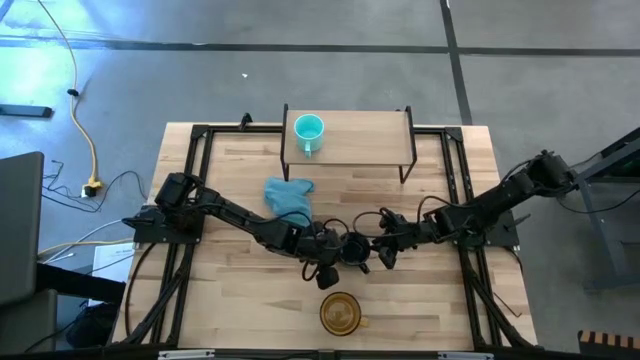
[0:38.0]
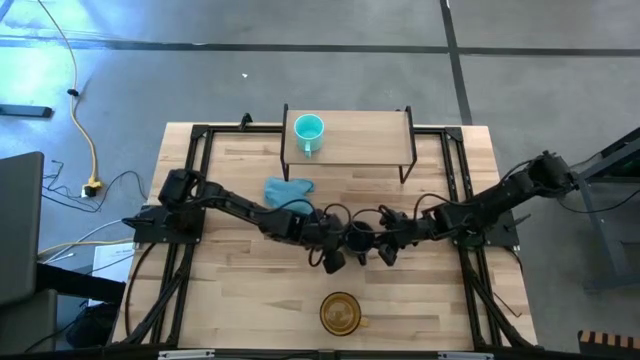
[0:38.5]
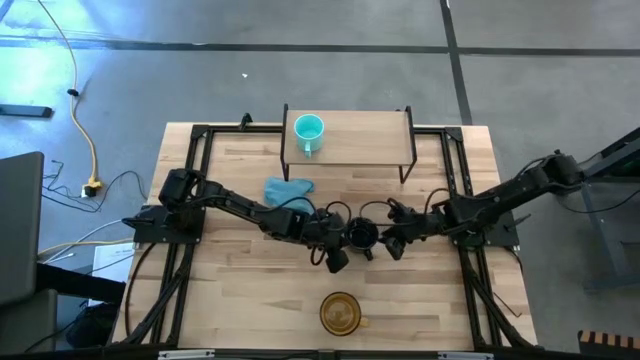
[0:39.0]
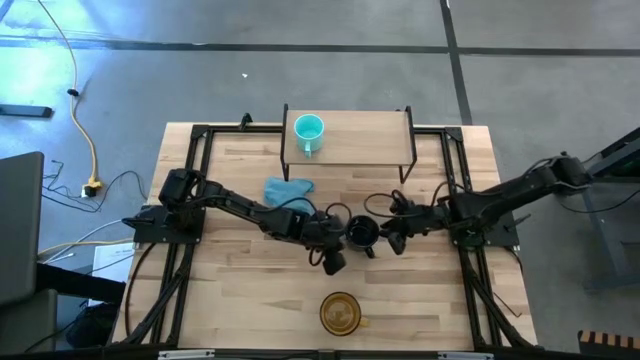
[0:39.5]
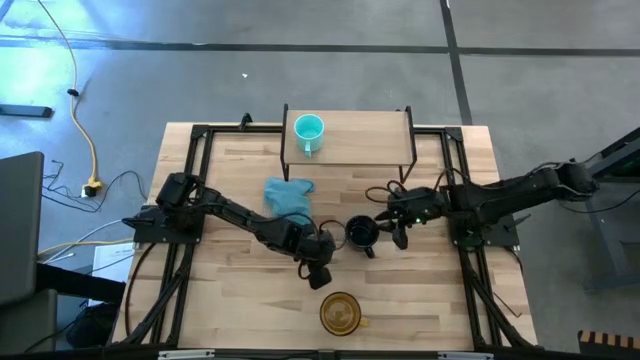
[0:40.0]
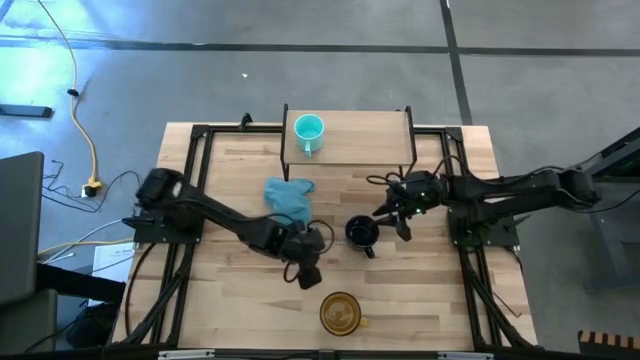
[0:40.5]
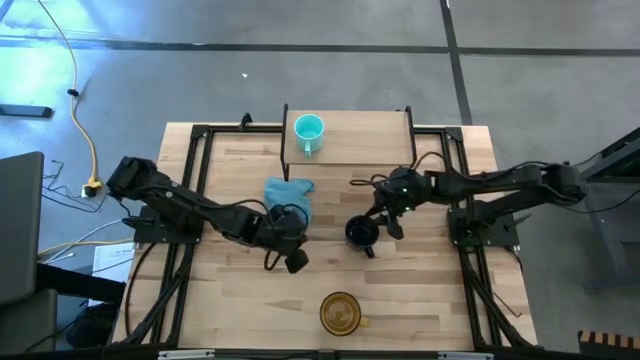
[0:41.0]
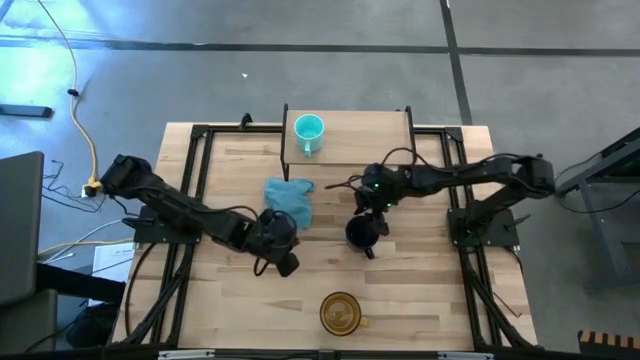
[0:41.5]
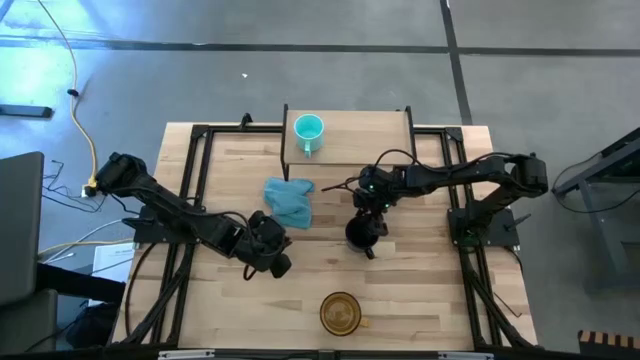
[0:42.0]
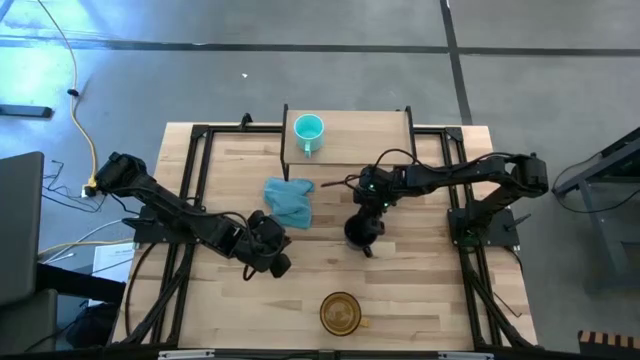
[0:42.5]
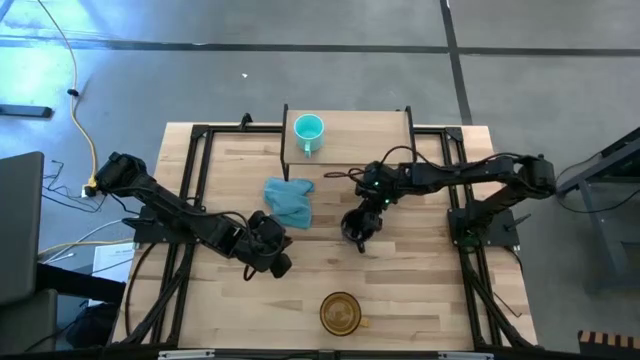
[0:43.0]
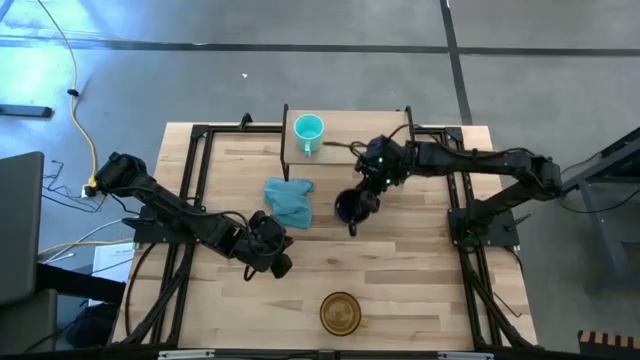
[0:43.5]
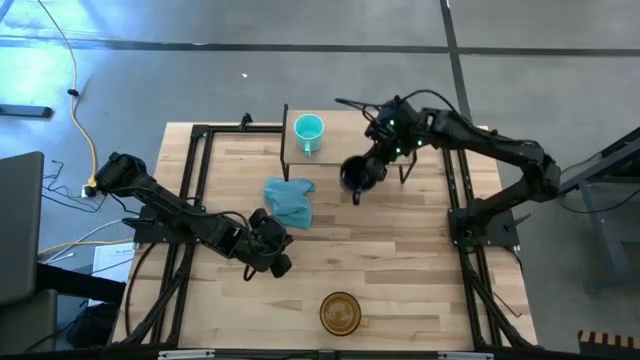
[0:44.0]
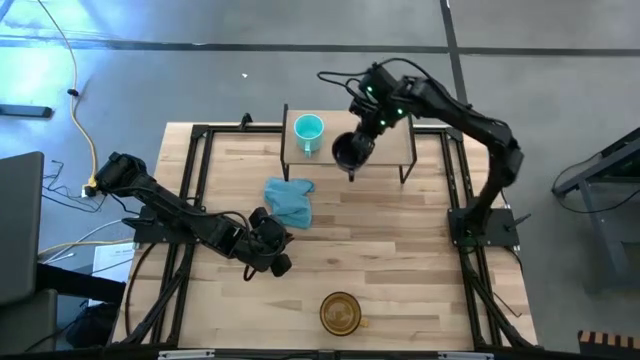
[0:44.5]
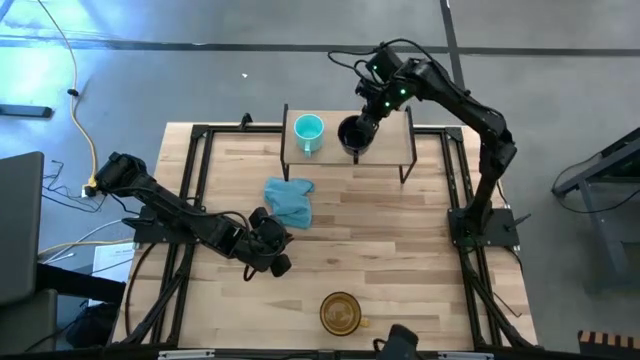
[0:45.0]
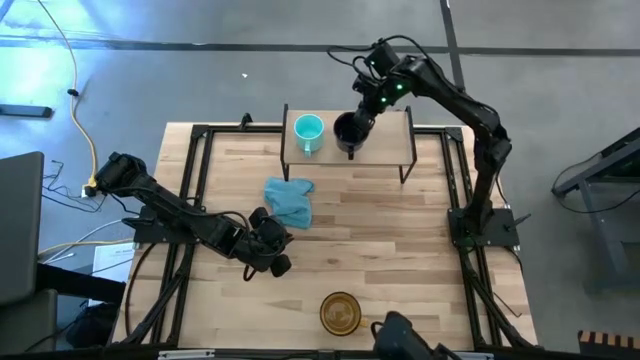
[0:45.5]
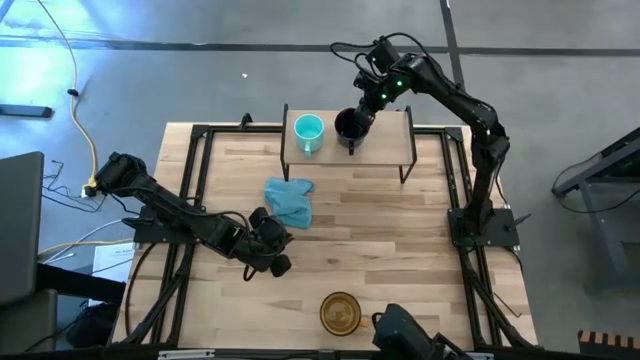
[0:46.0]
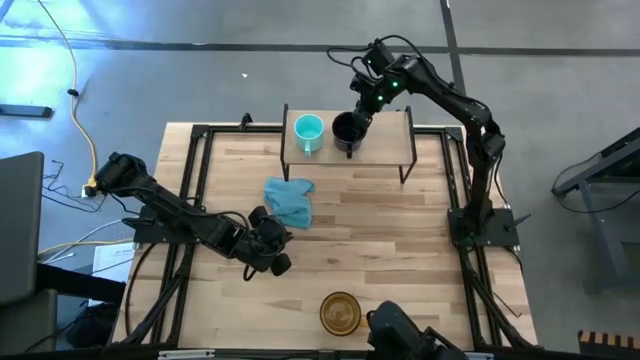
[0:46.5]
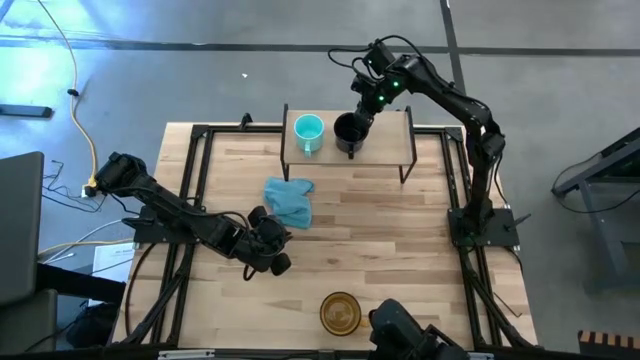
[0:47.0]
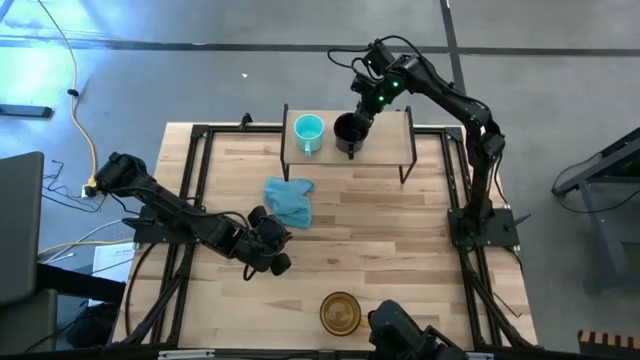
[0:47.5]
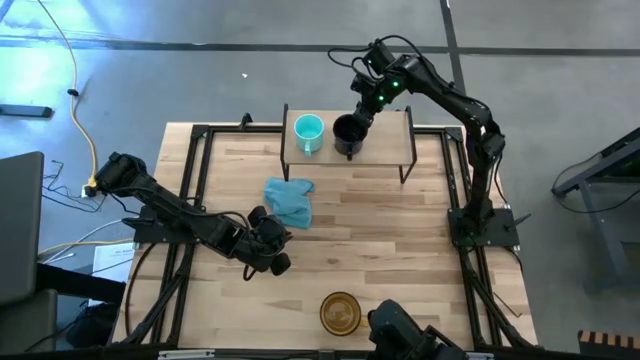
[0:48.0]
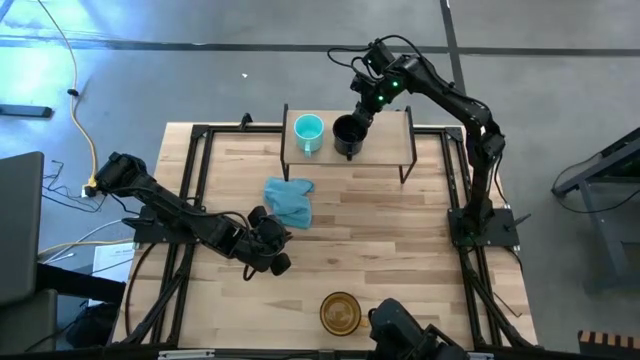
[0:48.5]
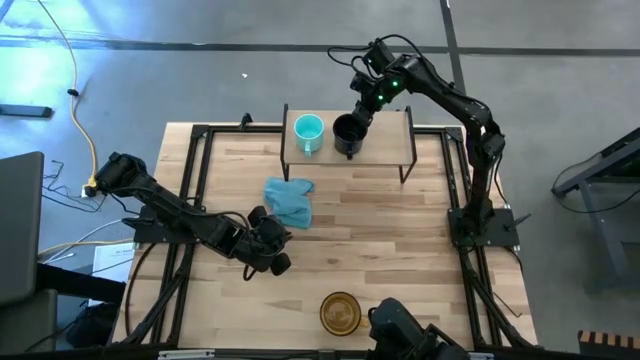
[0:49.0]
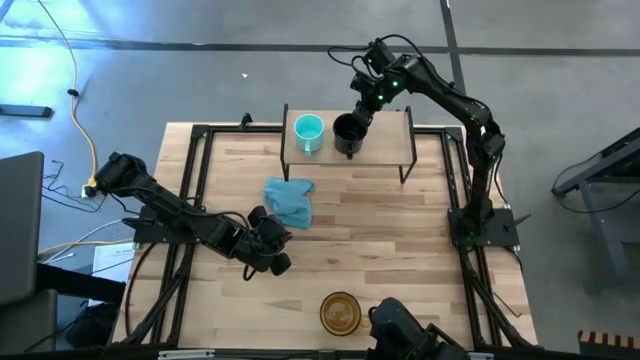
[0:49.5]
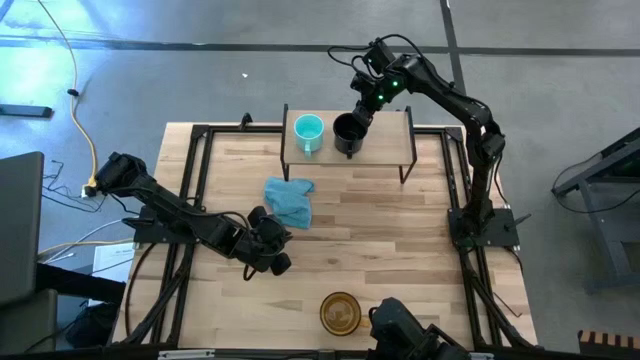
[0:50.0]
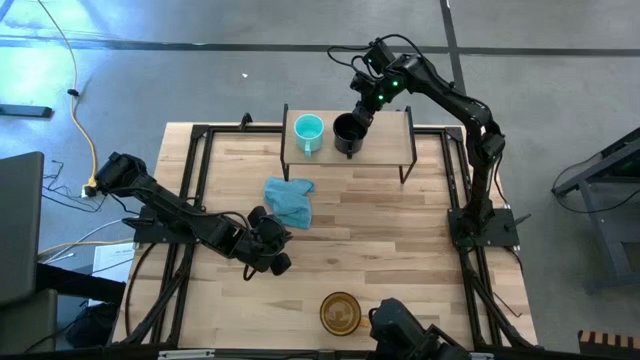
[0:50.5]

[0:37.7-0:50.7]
Task: Stack small to large cups/mugs on shelf
Put the black mug on the shelf

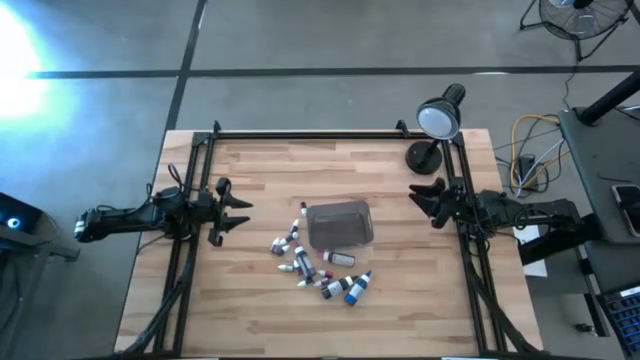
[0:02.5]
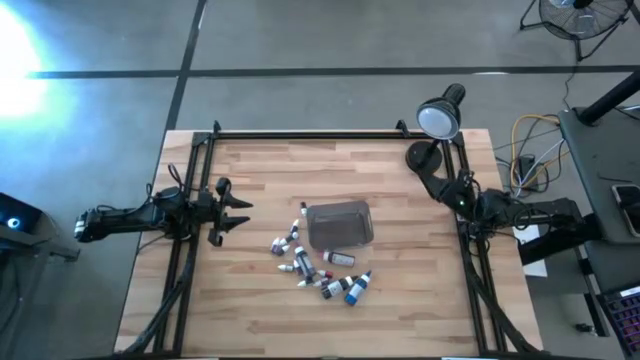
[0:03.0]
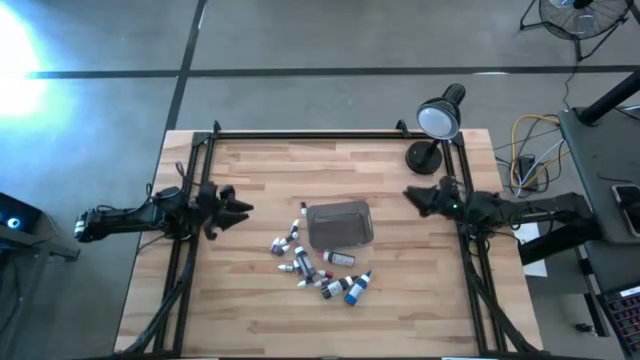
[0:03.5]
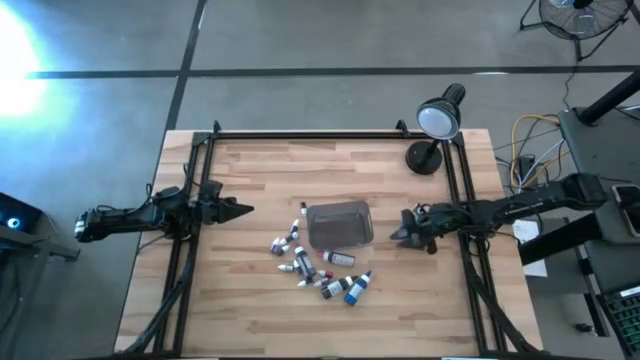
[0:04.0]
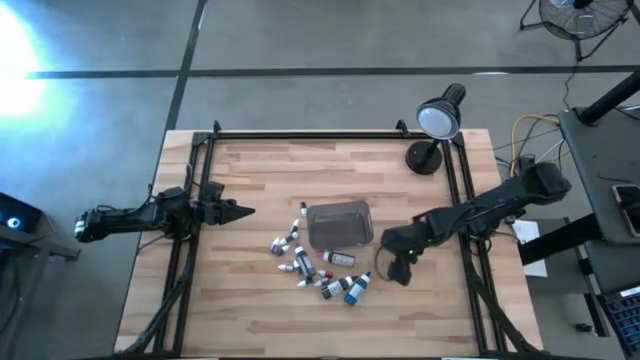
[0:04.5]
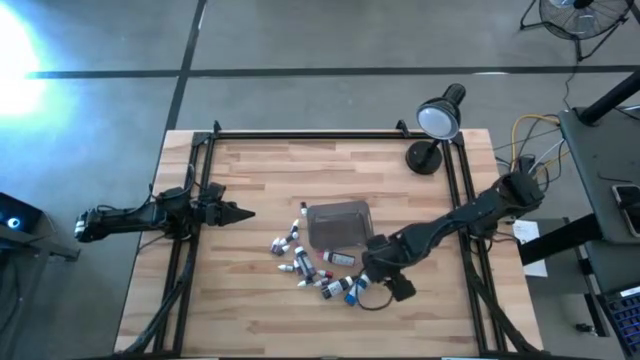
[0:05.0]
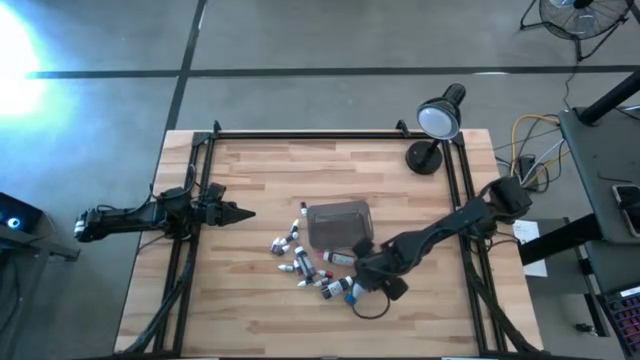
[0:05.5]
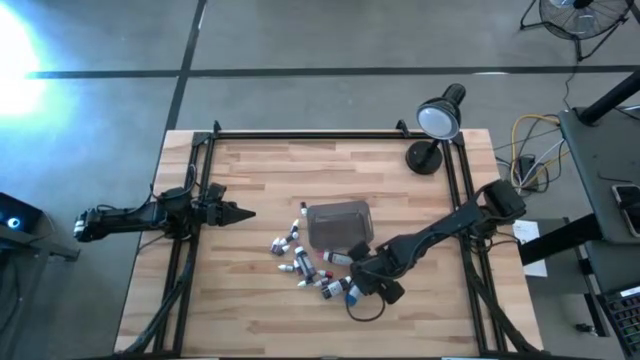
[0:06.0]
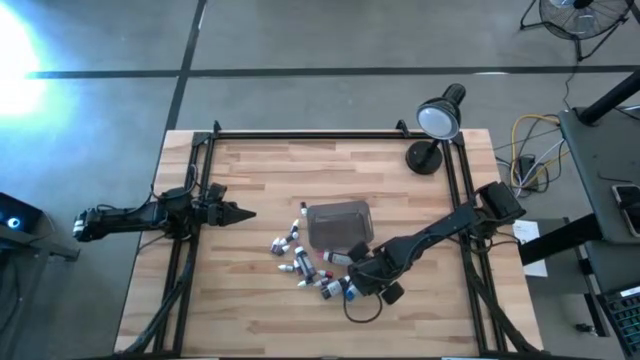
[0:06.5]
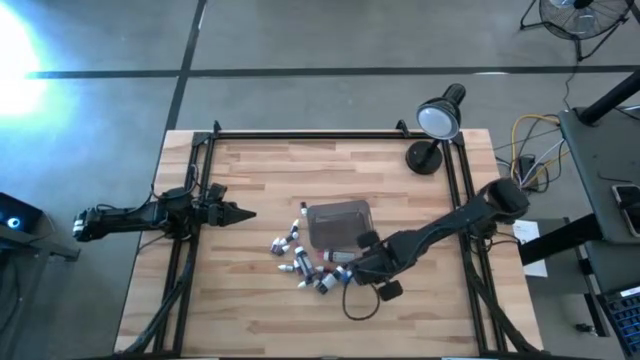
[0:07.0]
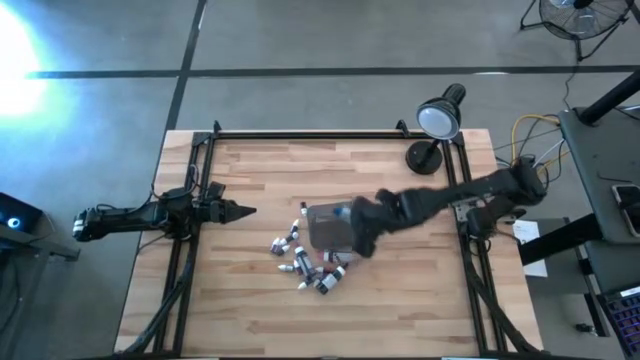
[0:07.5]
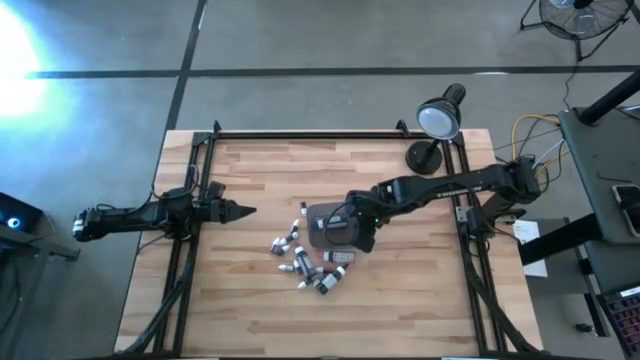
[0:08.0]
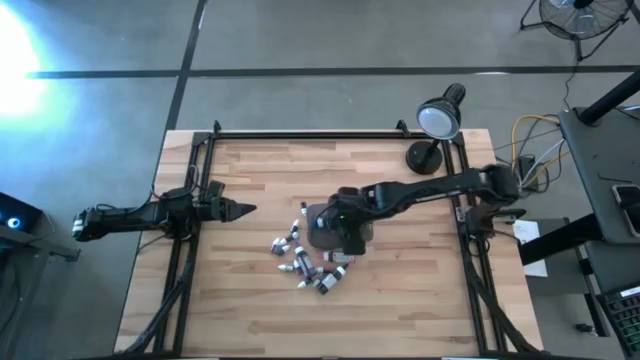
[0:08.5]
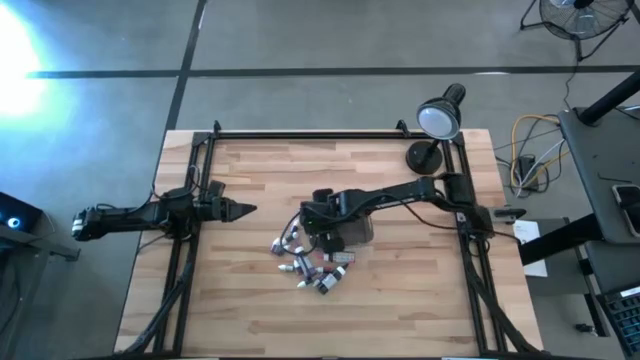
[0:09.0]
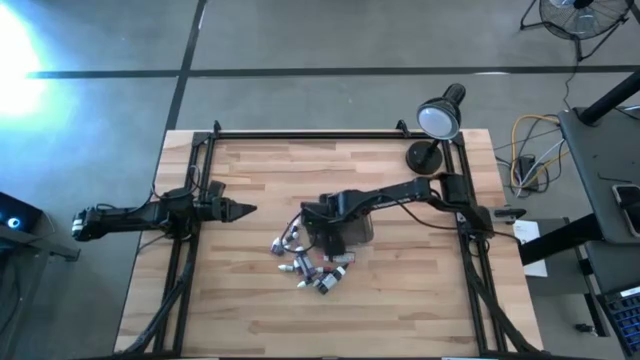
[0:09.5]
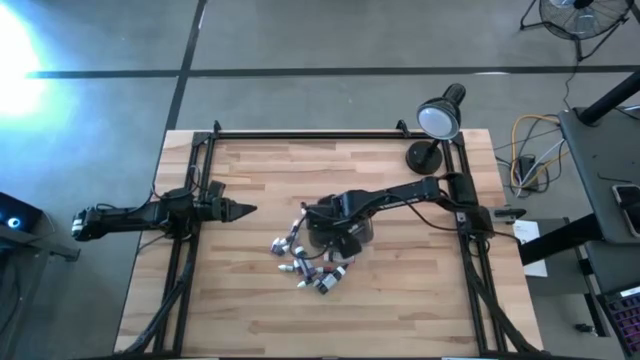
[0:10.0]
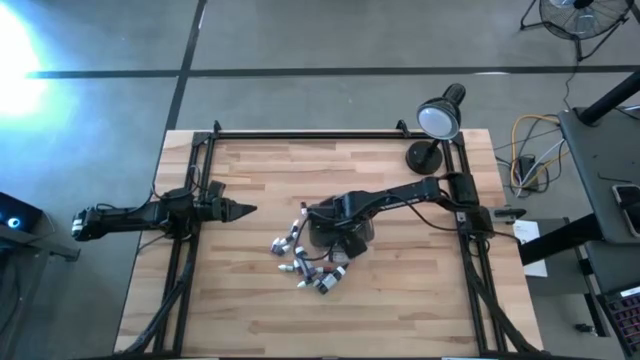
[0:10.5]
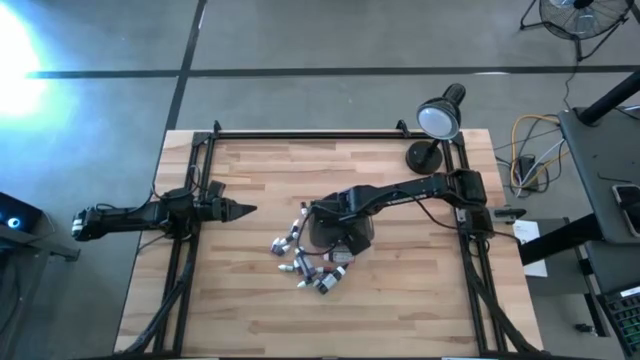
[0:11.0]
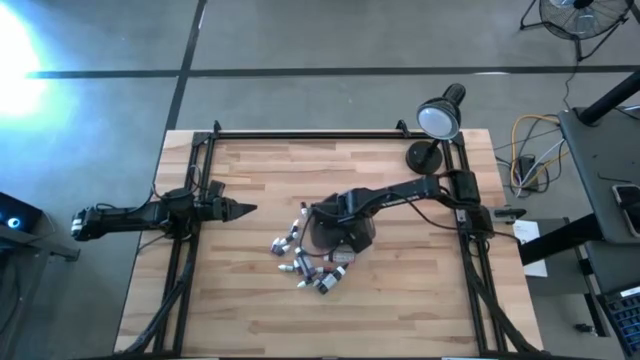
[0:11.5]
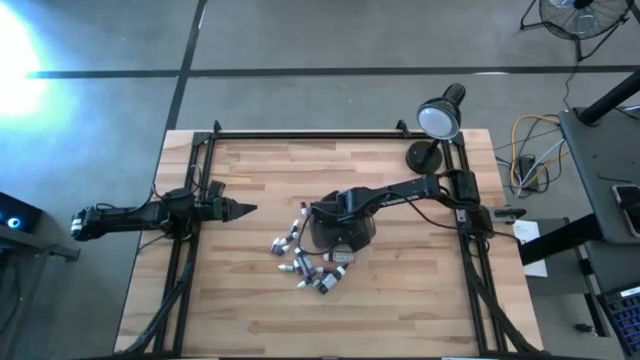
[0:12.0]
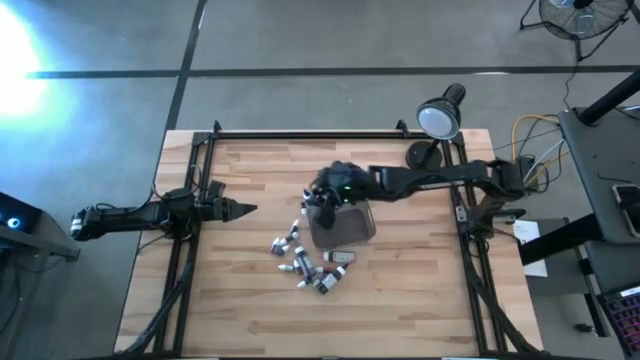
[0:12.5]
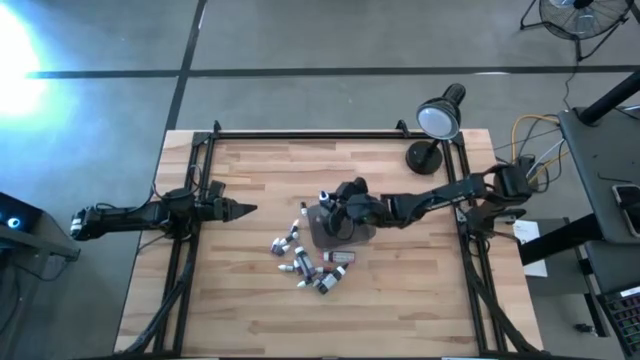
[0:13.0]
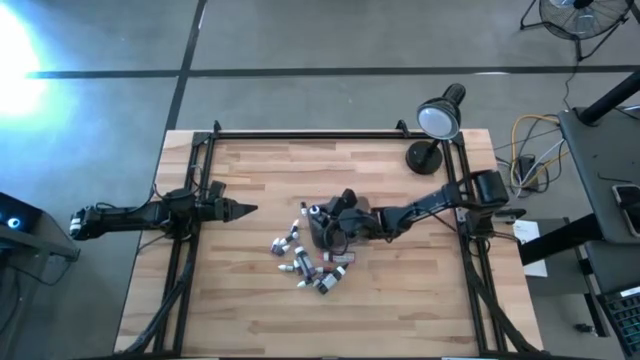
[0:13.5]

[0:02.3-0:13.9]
Task: Pick & Place food coloring
Put the big blue food coloring bottle into the black transparent bin
